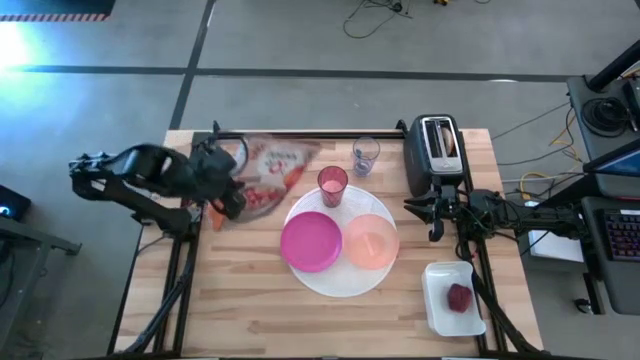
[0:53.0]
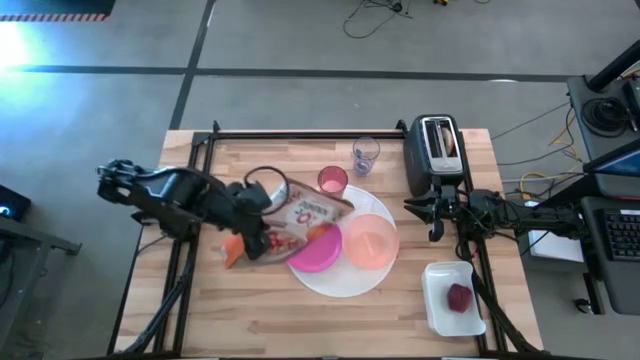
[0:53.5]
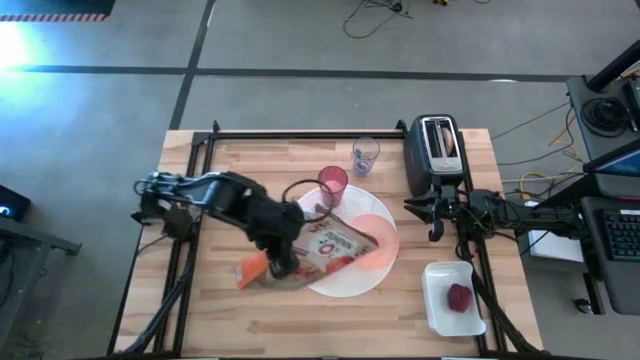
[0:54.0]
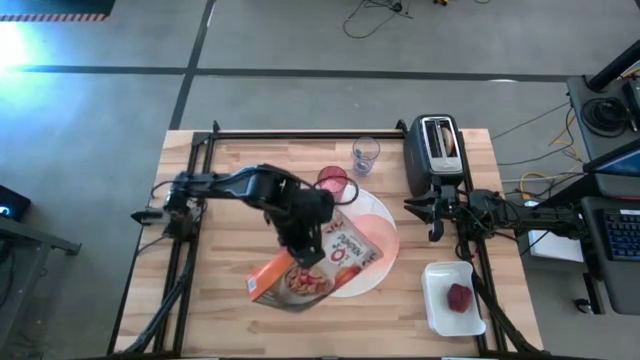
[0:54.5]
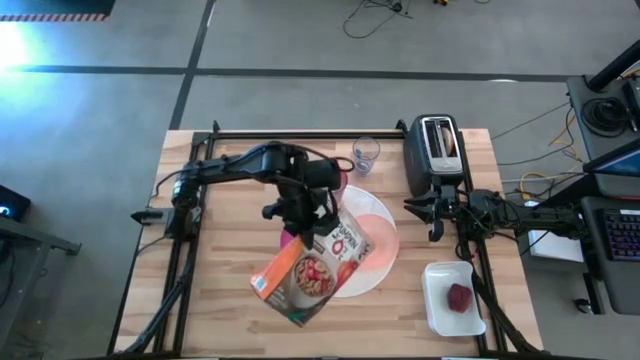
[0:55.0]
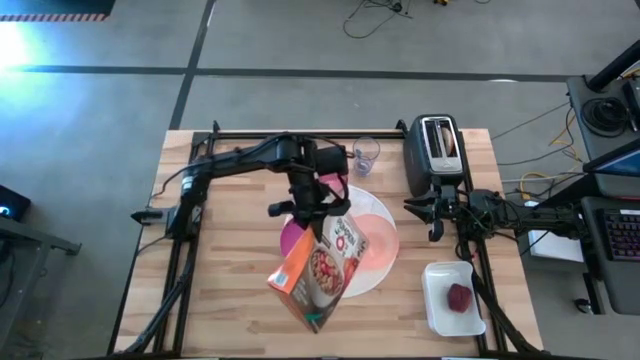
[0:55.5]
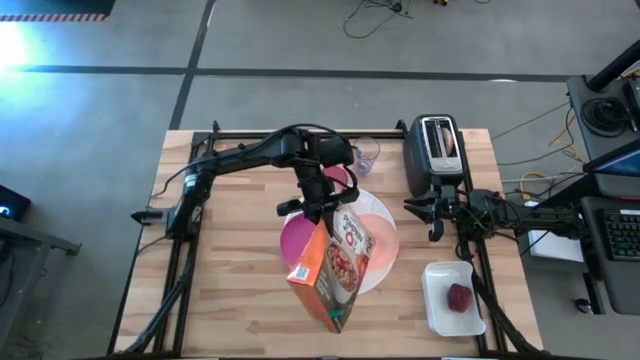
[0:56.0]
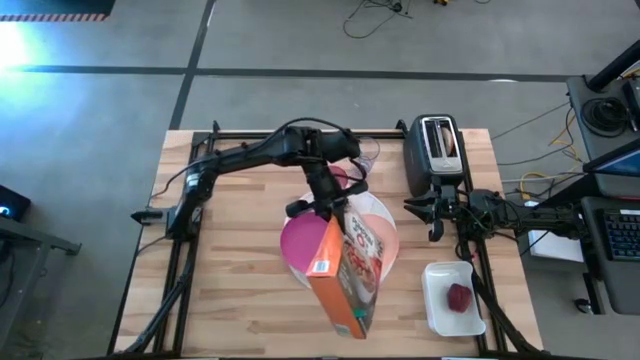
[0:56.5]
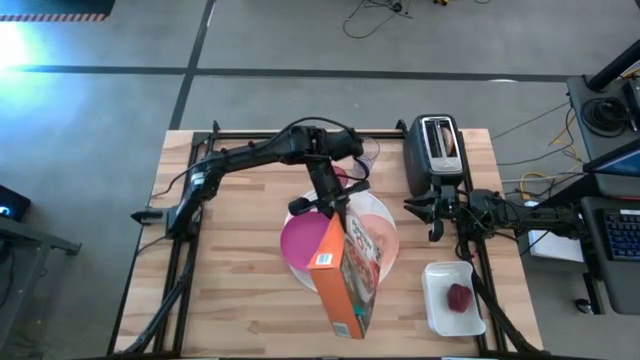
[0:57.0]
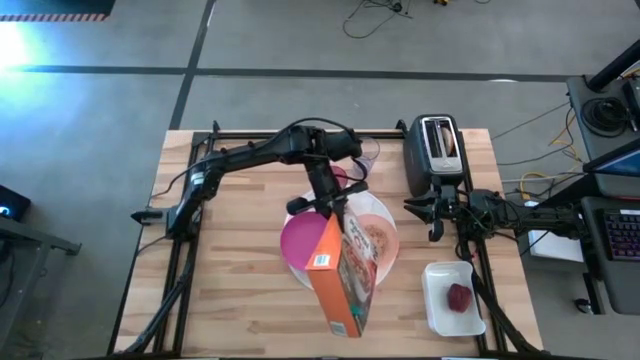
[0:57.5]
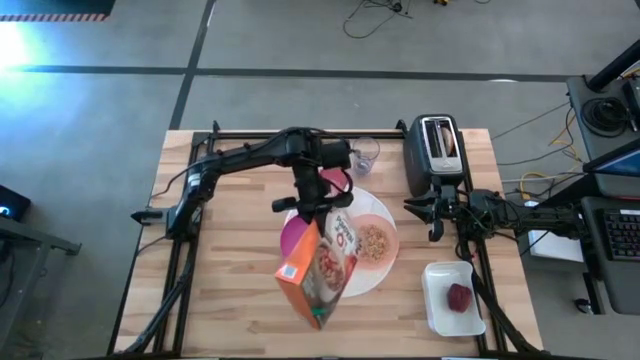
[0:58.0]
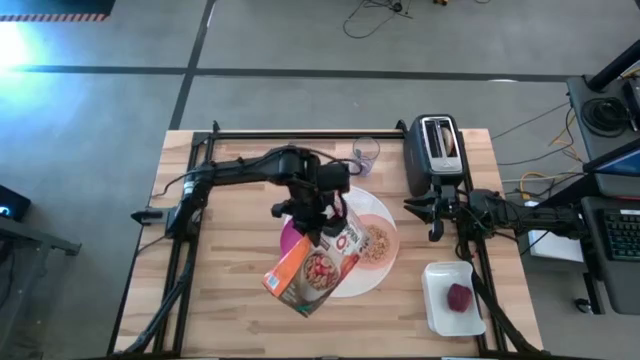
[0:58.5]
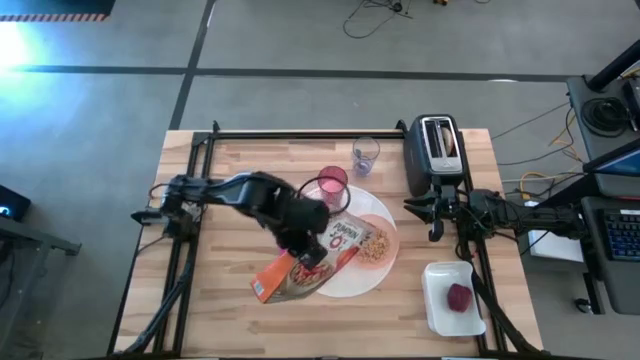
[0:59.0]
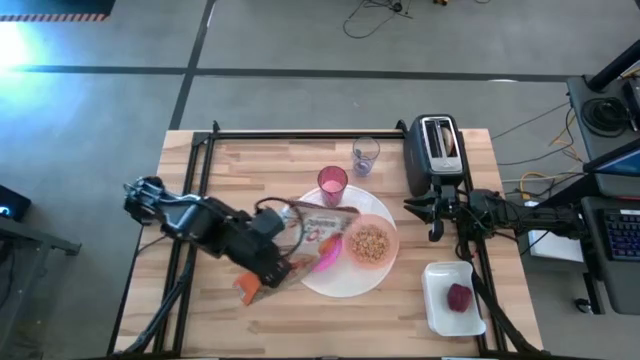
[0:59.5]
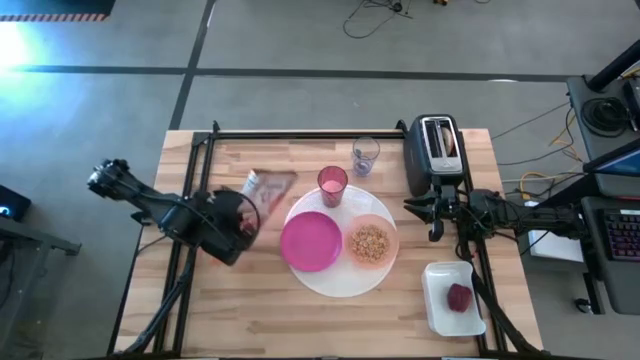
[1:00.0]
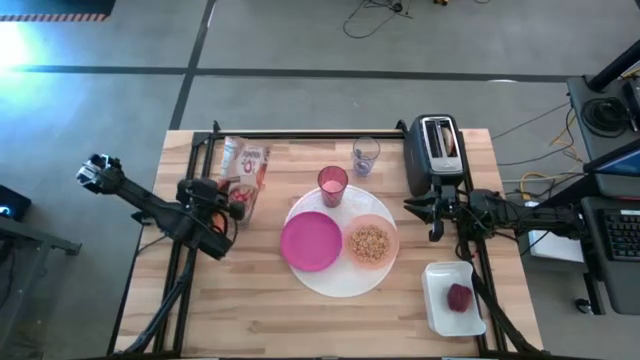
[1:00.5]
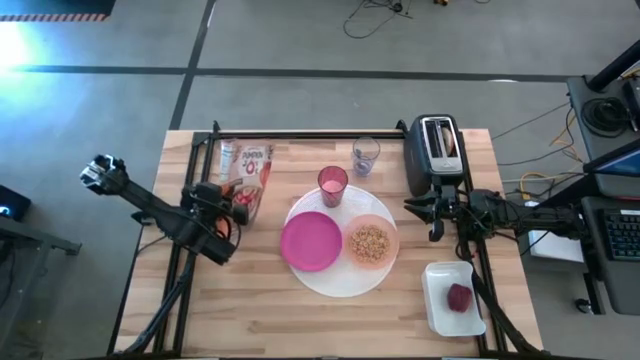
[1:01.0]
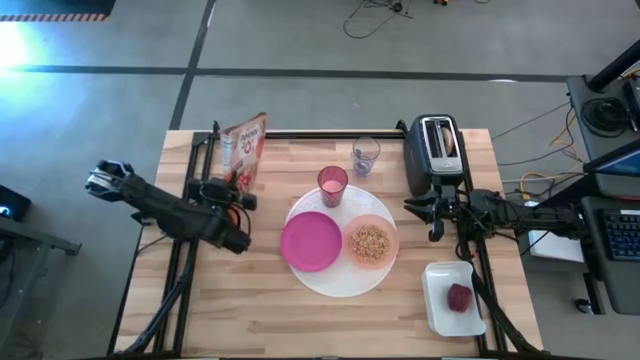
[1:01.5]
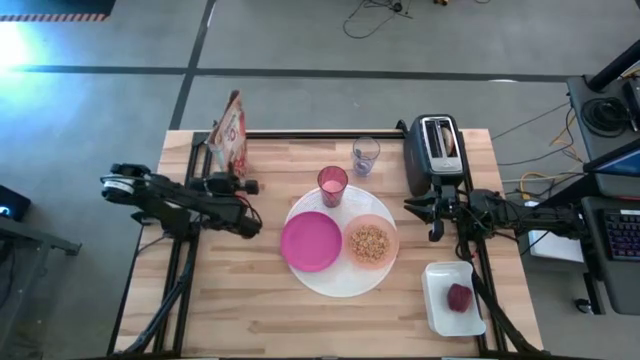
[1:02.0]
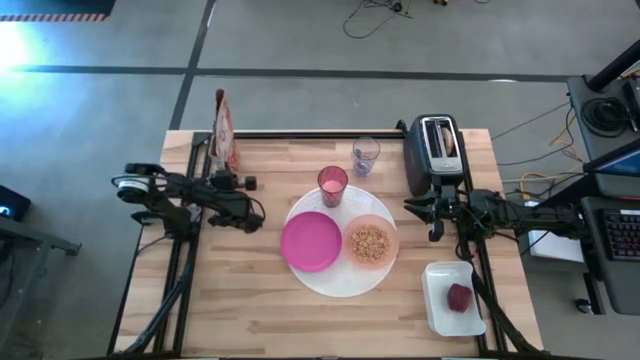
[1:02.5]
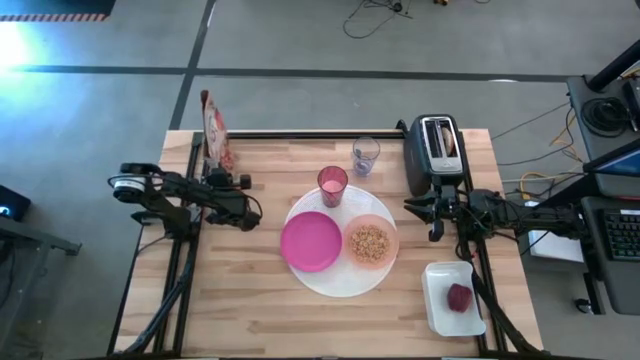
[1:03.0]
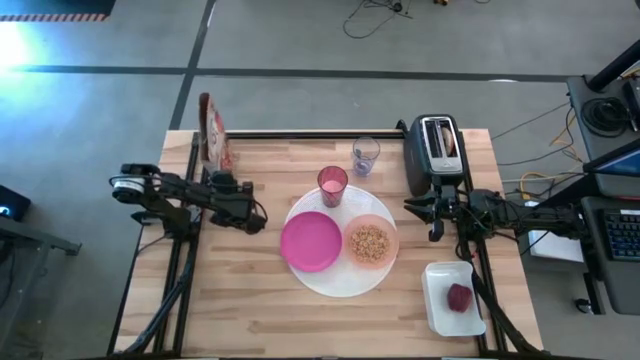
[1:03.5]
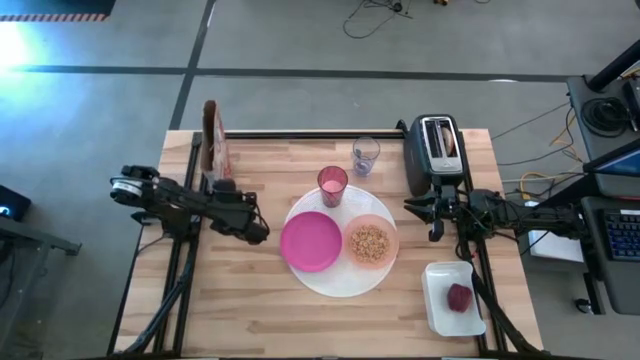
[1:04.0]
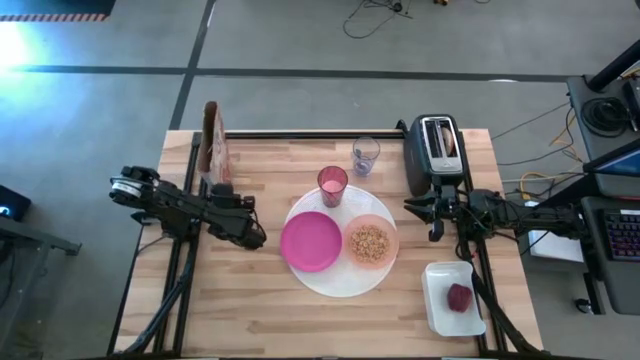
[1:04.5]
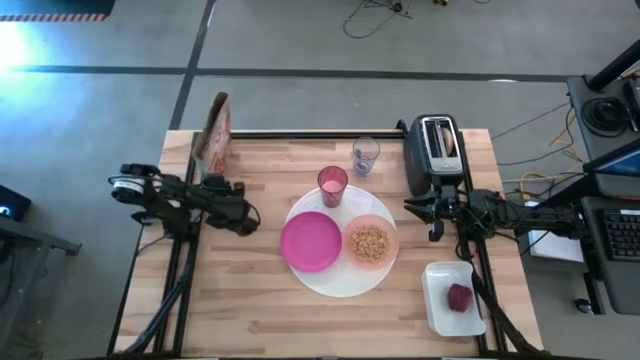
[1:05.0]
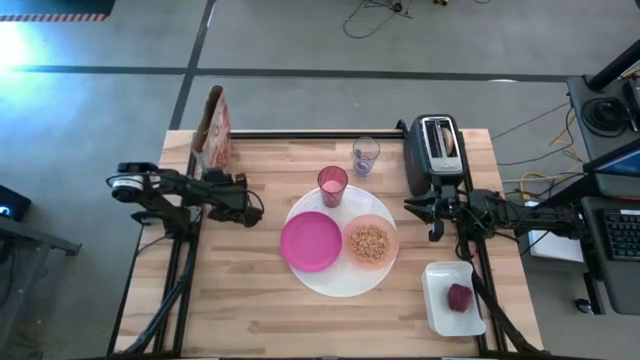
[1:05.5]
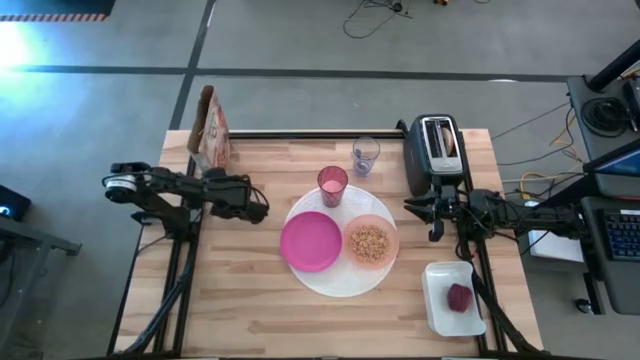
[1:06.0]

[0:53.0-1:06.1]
Task: Arrange a breakfast setting
Pour the cereal into the orange bowl
